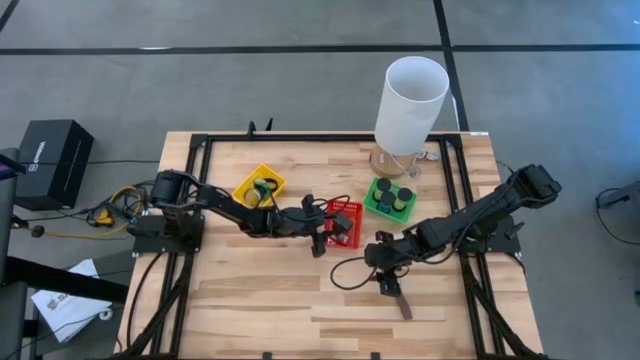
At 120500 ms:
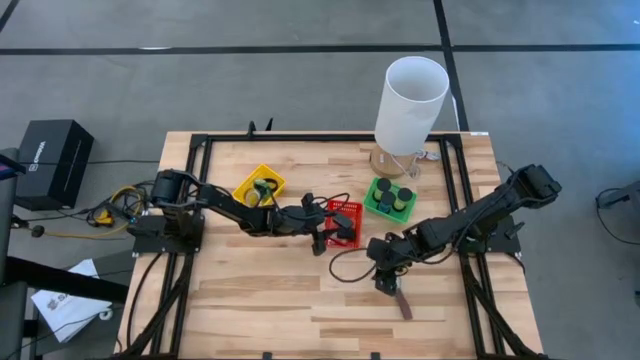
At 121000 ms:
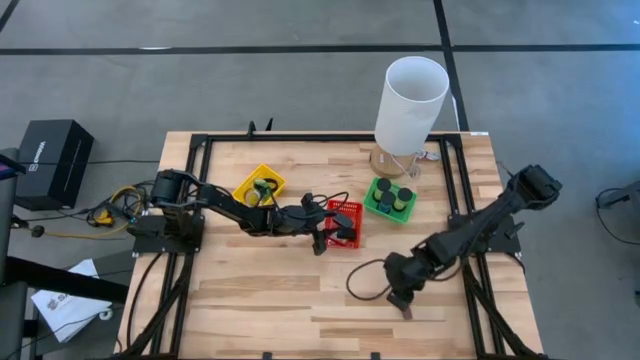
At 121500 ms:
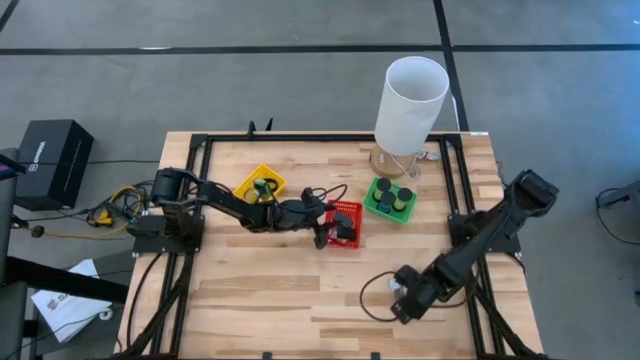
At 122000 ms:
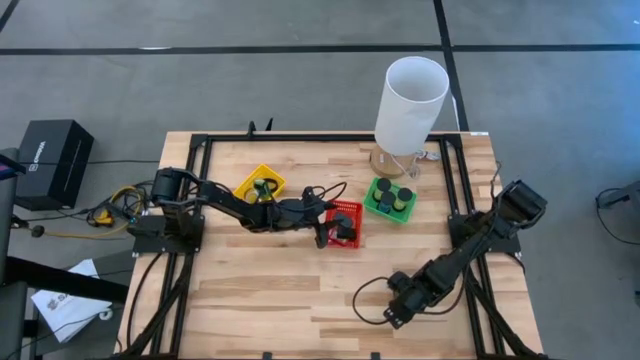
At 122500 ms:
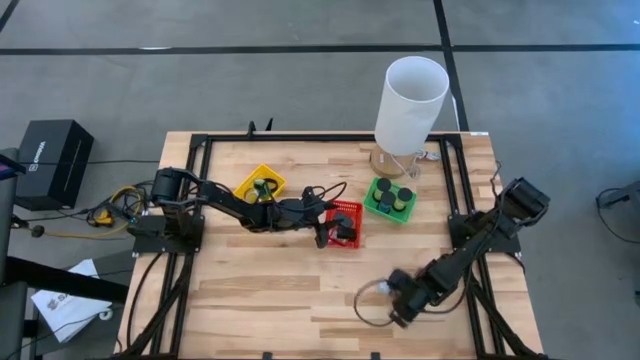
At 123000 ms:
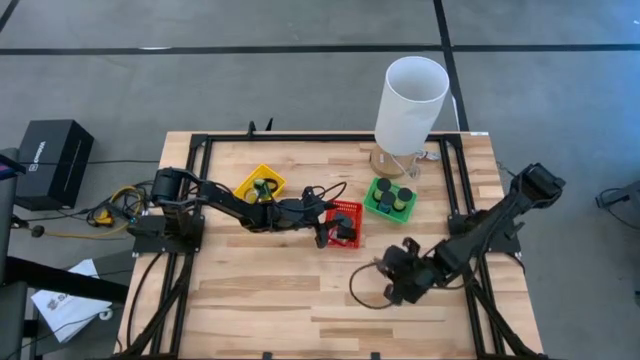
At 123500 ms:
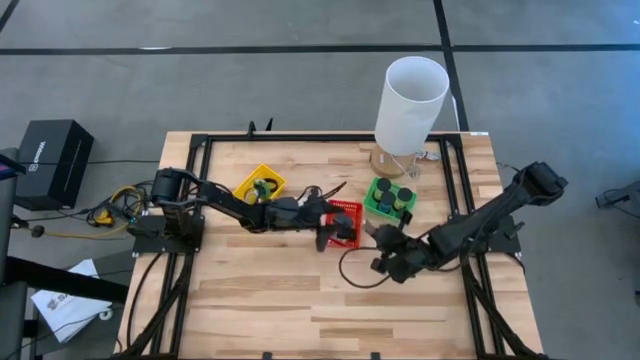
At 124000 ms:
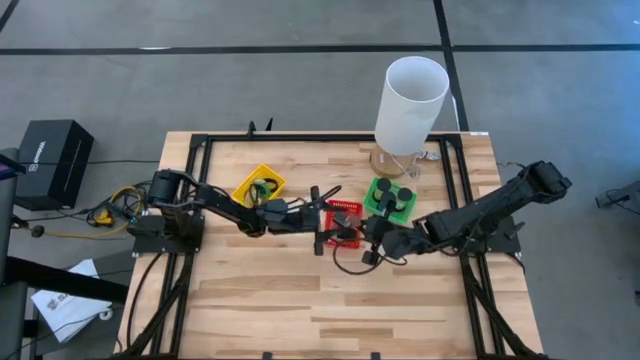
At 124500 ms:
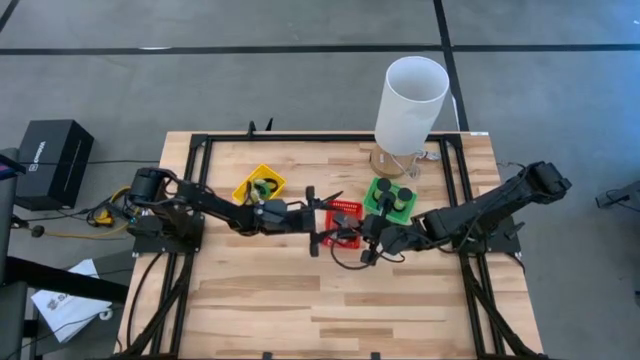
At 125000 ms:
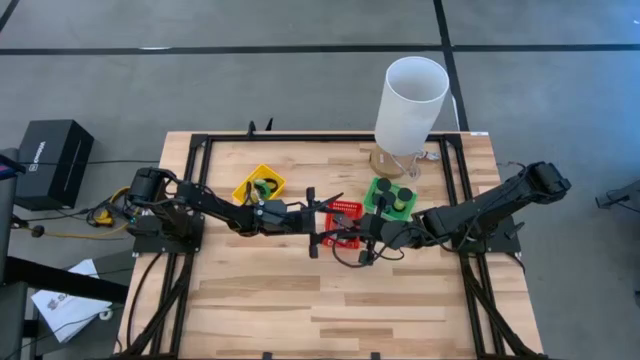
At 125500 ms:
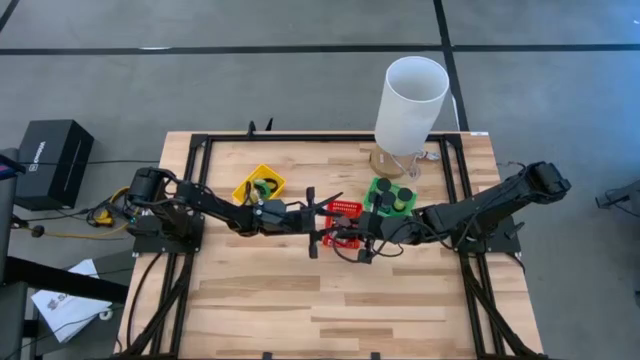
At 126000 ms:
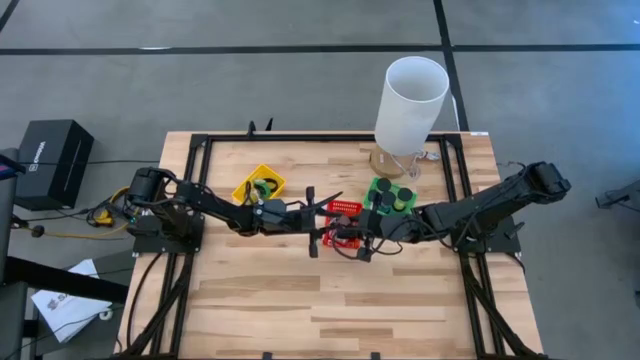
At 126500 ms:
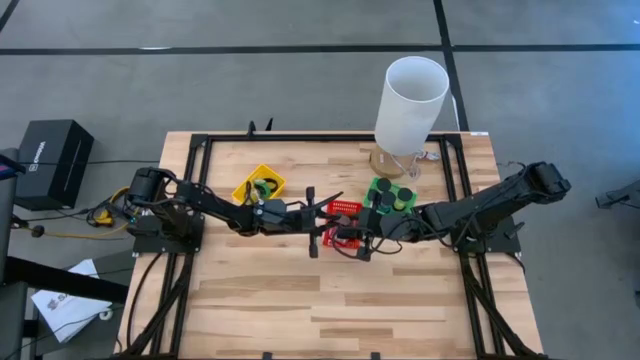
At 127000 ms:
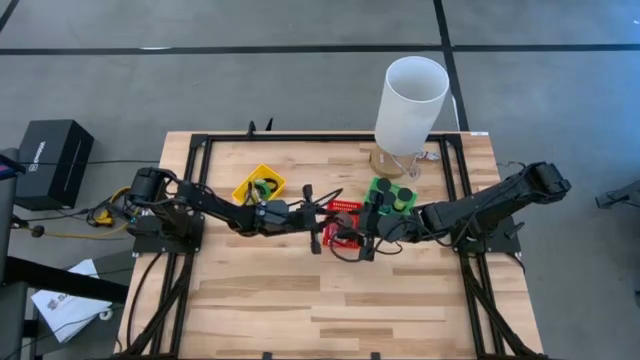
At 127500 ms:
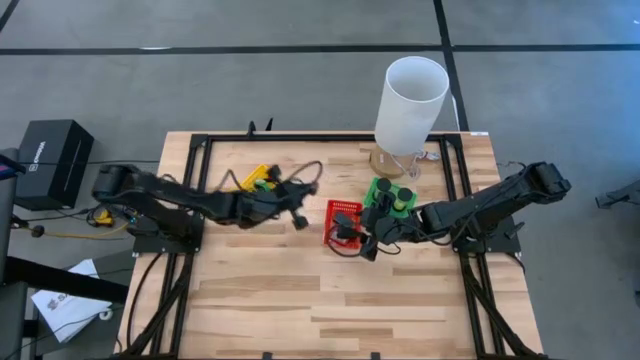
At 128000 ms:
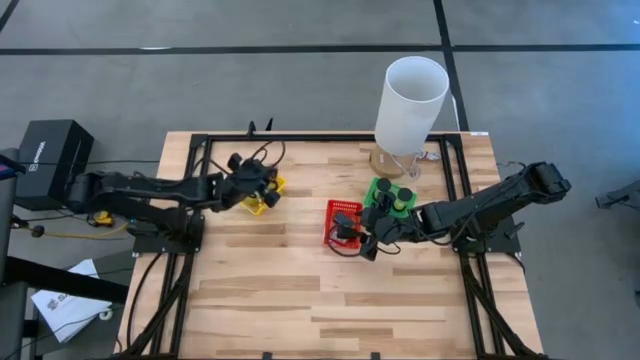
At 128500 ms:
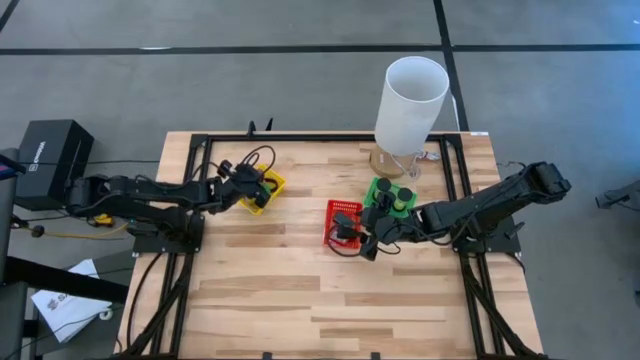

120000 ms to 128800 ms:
Task: Pick & Place Office items
Put the brown wristwatch into the yellow bin

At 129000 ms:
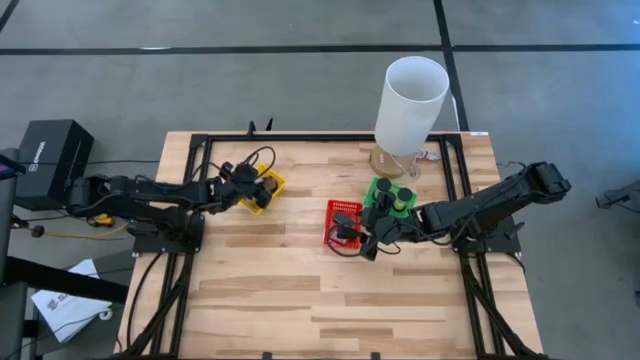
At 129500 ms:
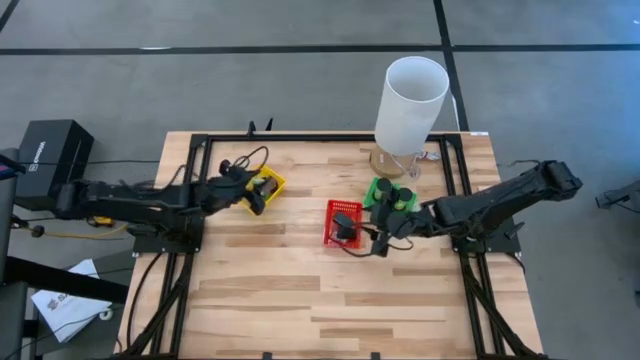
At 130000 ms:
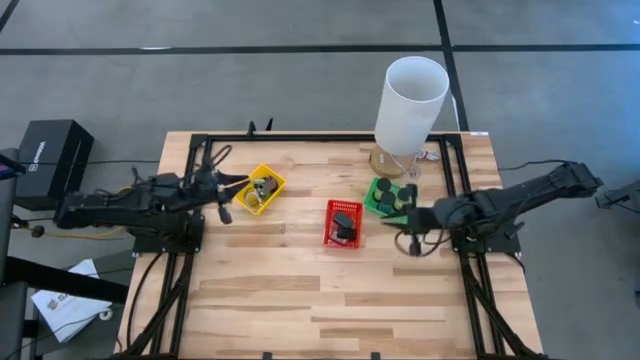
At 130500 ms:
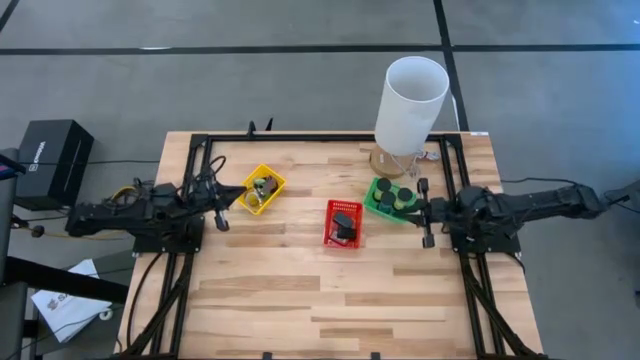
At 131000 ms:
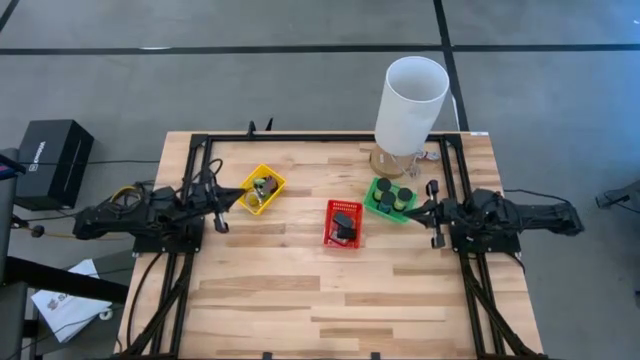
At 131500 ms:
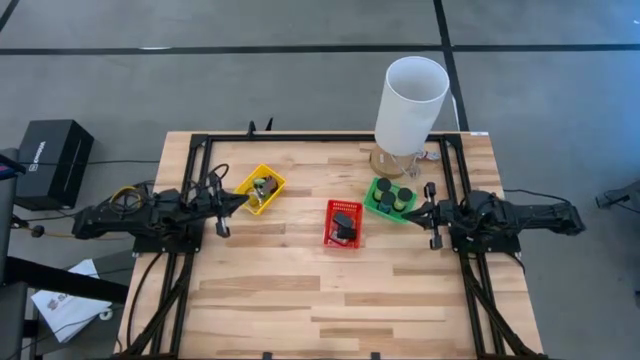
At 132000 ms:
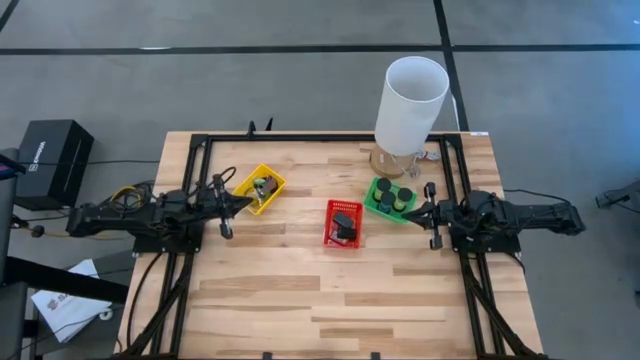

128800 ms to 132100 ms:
Return to Home Position

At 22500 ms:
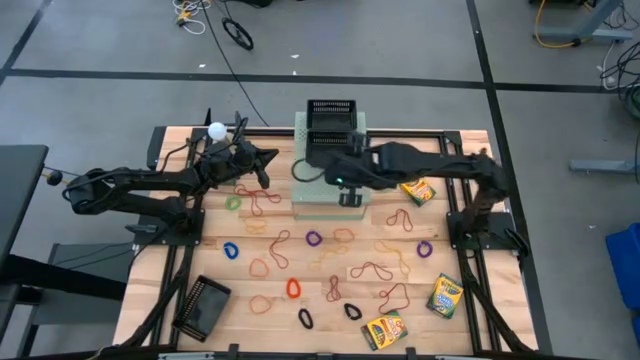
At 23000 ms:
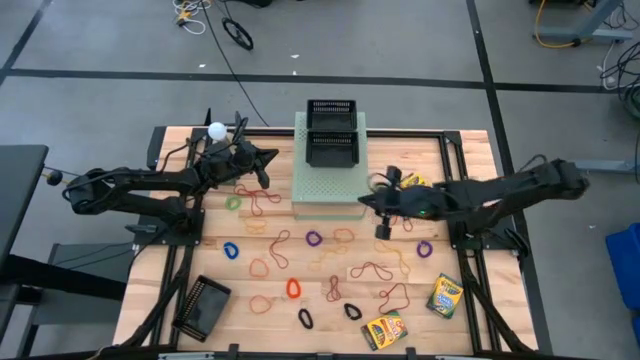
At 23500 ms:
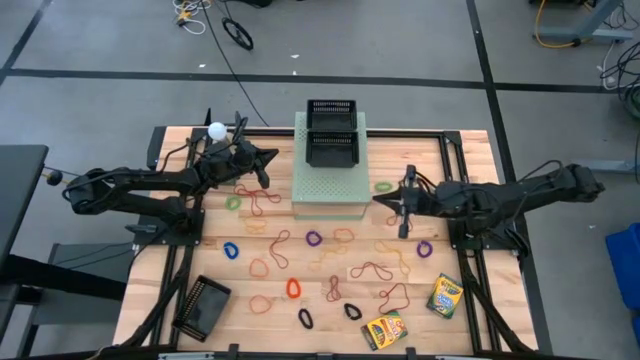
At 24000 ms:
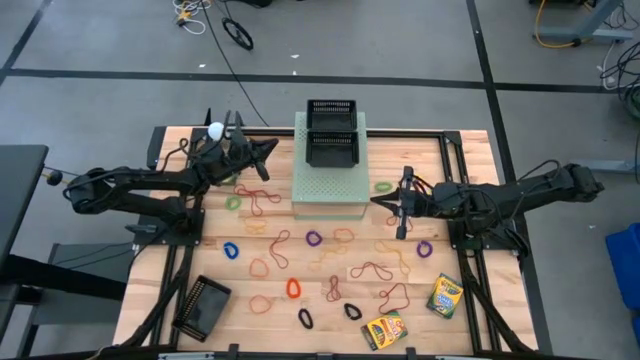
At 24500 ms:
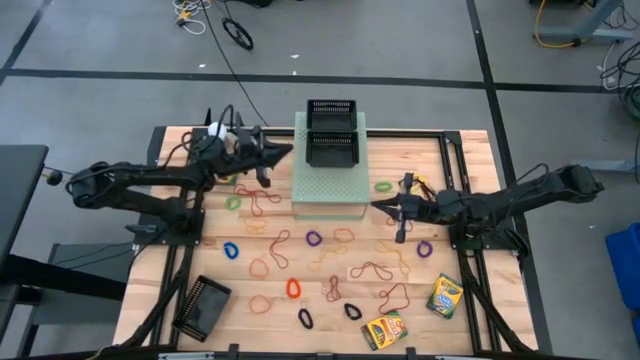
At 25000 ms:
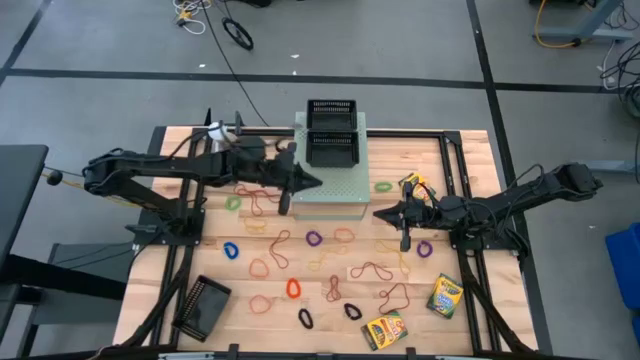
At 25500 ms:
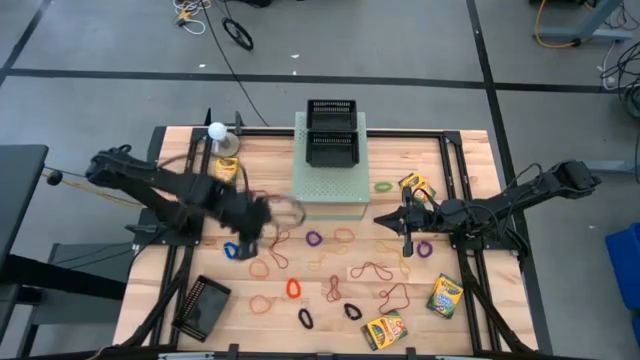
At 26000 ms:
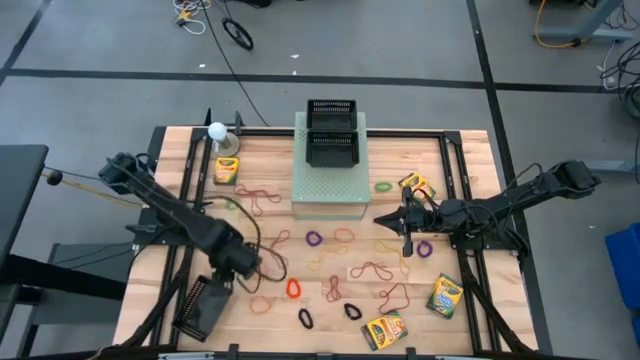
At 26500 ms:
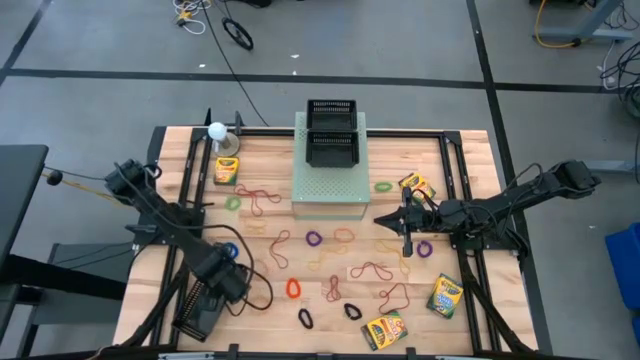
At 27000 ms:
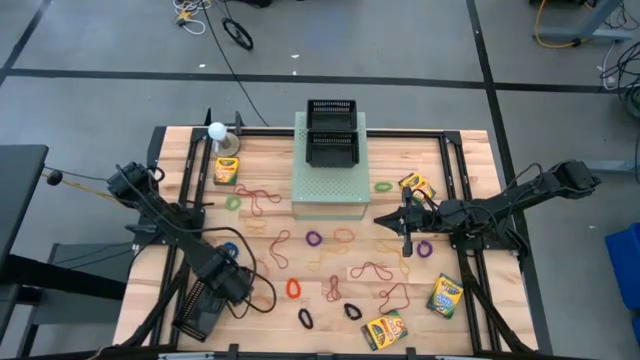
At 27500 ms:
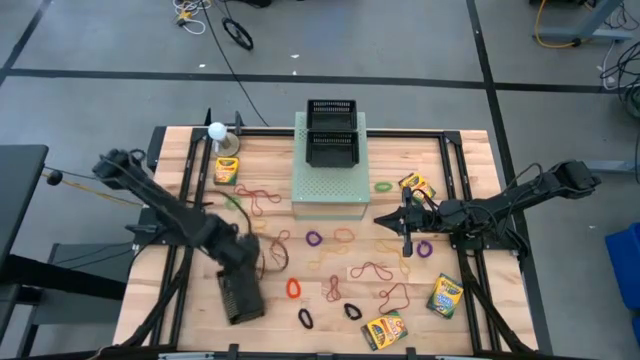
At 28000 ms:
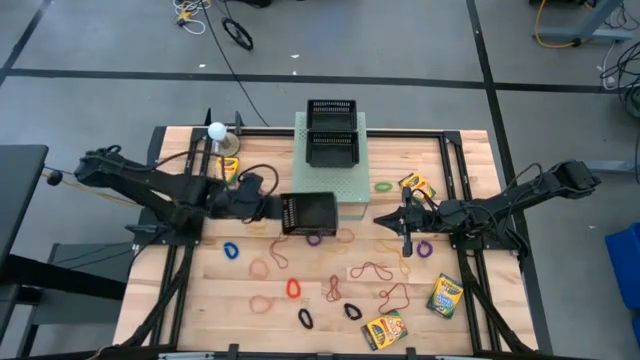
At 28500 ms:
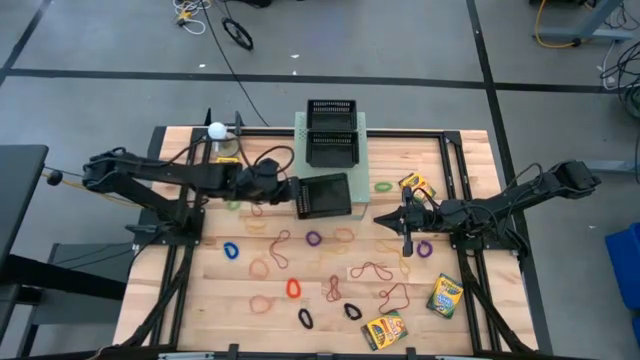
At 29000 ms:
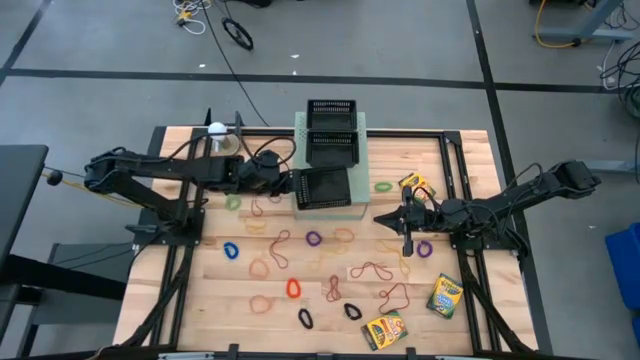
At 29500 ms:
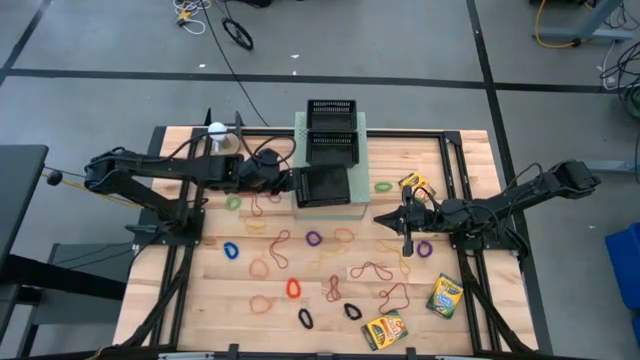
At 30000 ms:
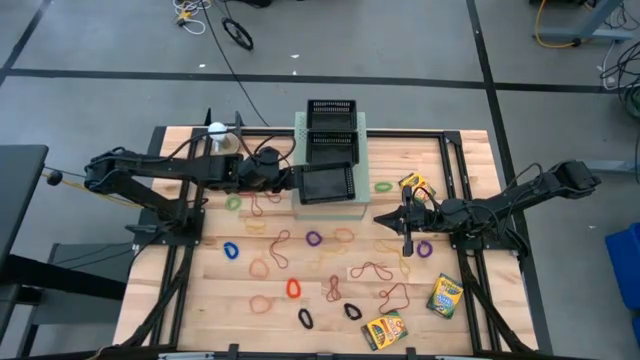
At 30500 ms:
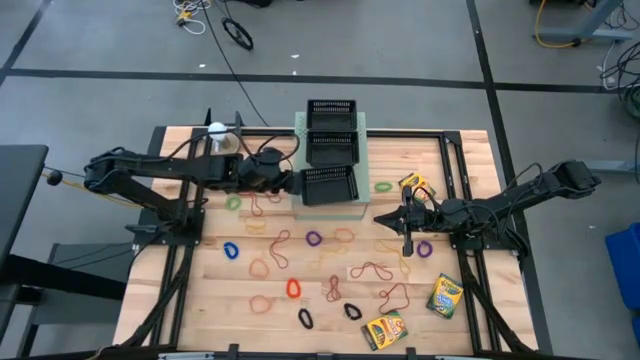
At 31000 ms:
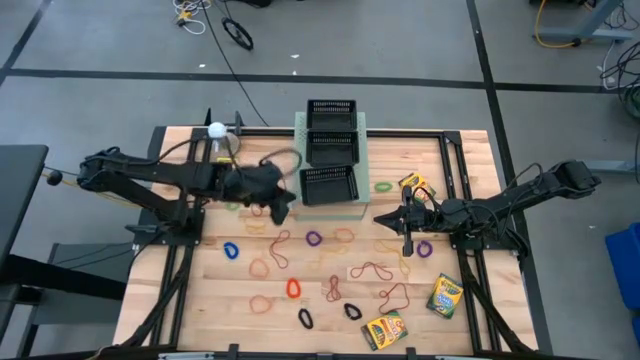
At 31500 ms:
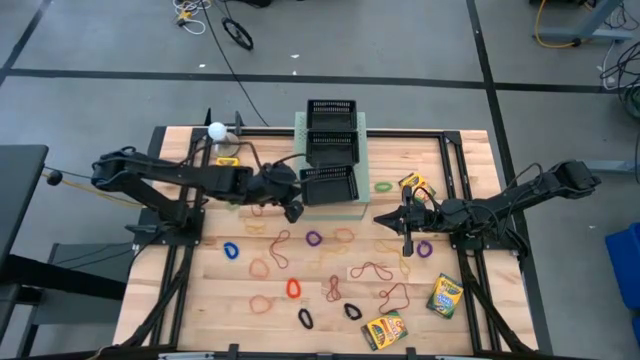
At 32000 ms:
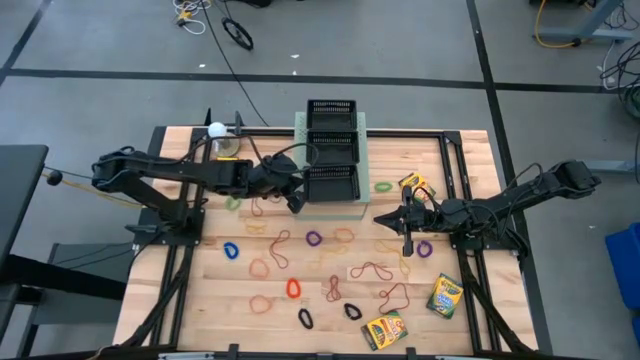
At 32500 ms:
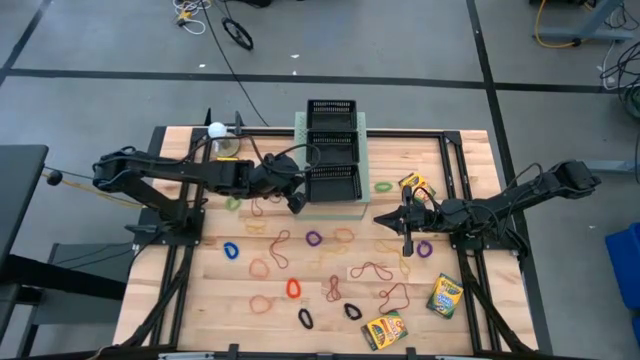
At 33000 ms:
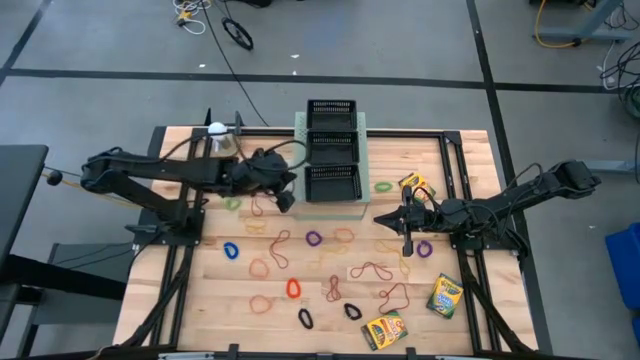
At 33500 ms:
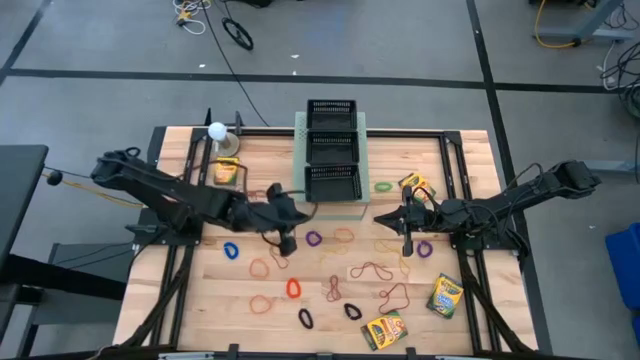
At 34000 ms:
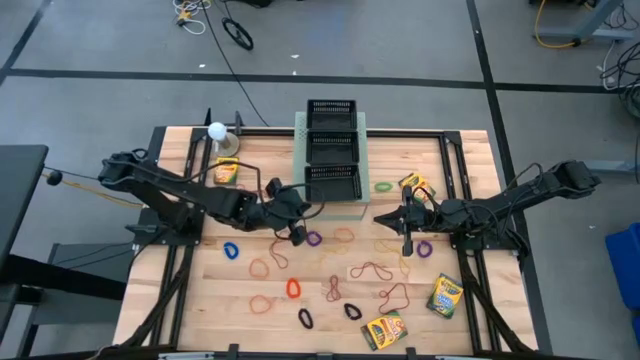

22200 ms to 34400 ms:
Task: Pick & Place Office Desk Supplies
Put the black bin on the shelf aligned with the other black bin
